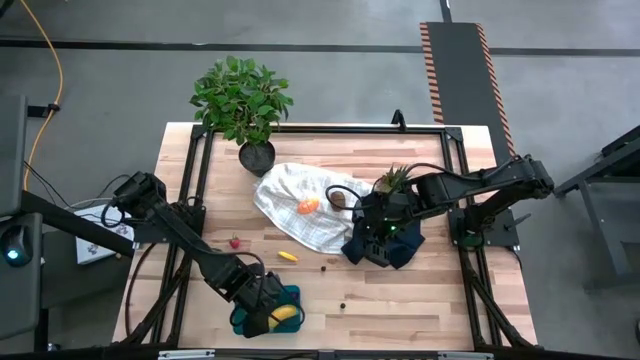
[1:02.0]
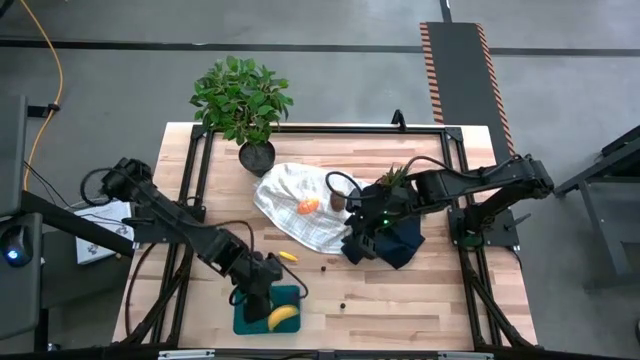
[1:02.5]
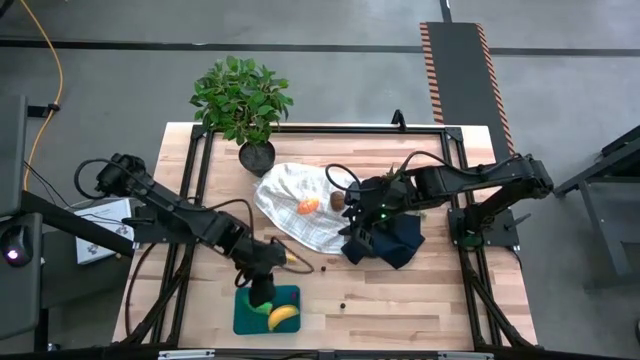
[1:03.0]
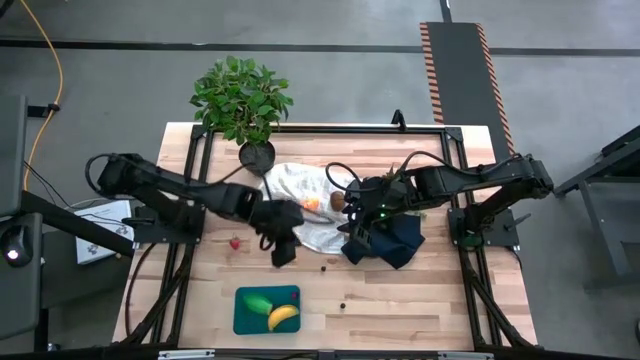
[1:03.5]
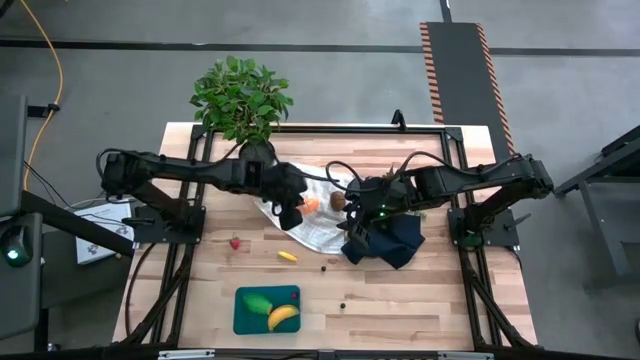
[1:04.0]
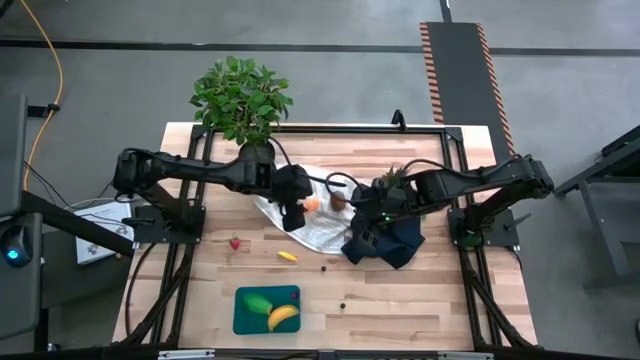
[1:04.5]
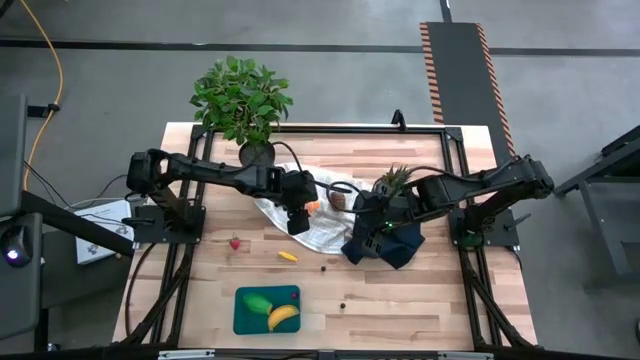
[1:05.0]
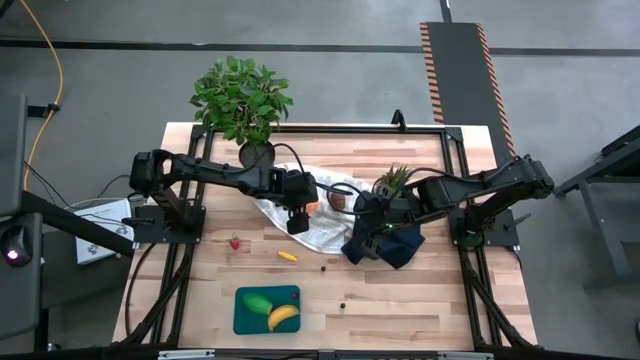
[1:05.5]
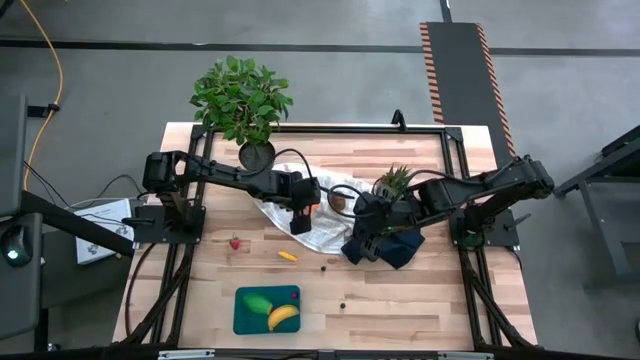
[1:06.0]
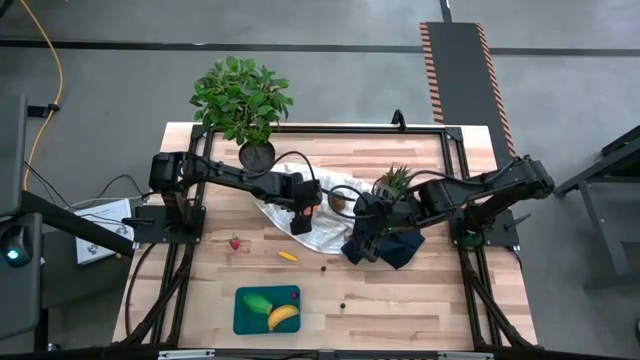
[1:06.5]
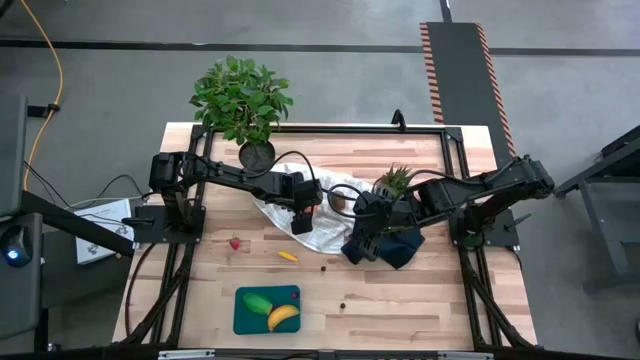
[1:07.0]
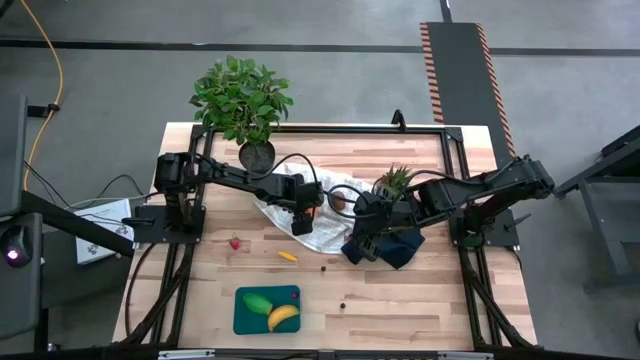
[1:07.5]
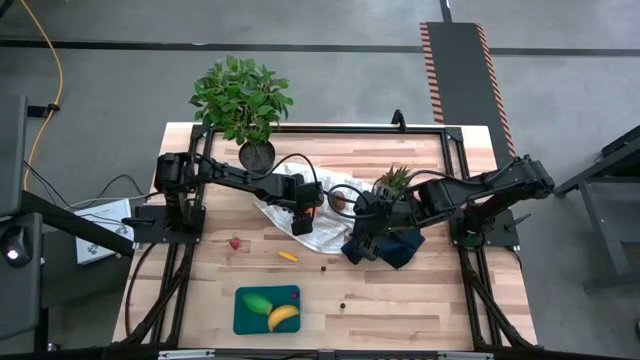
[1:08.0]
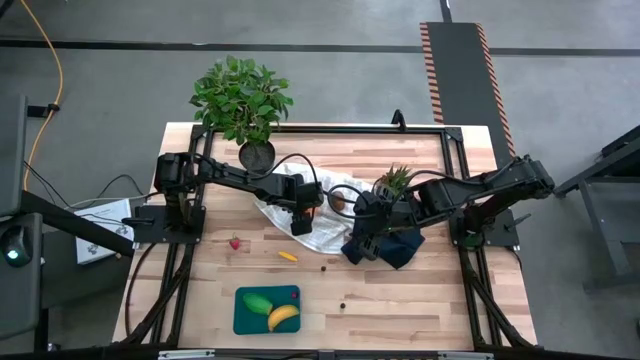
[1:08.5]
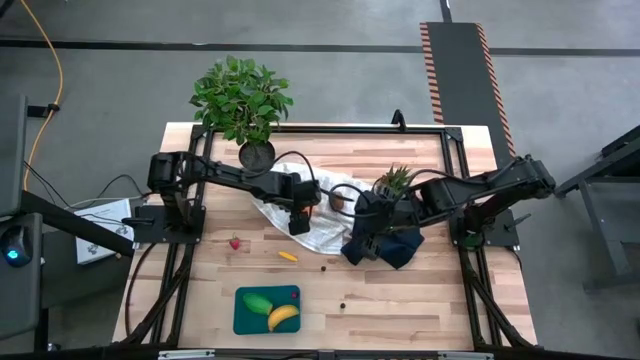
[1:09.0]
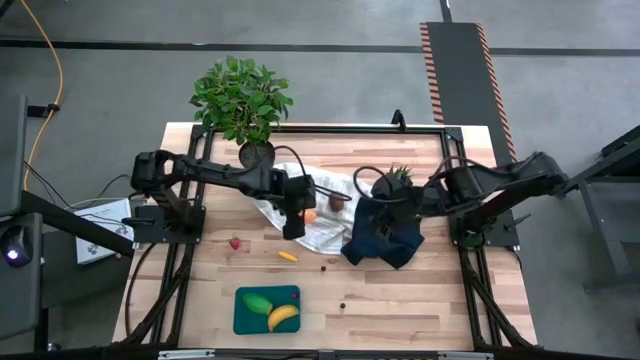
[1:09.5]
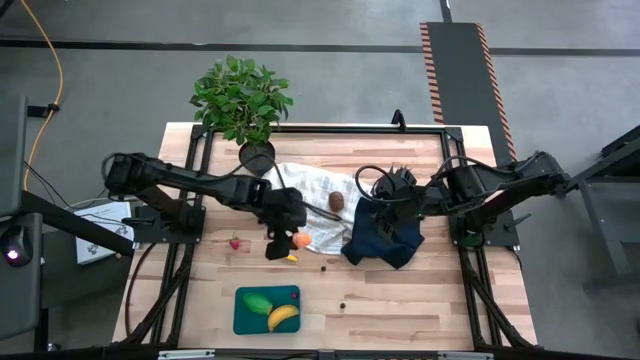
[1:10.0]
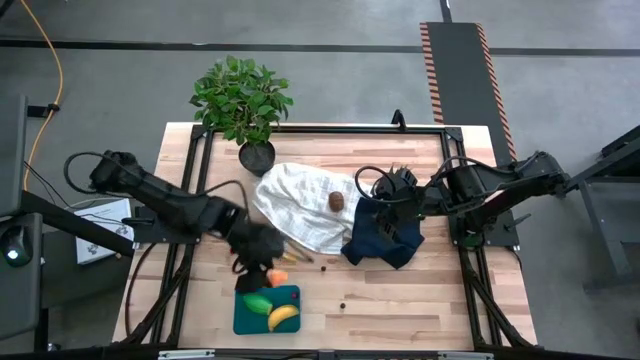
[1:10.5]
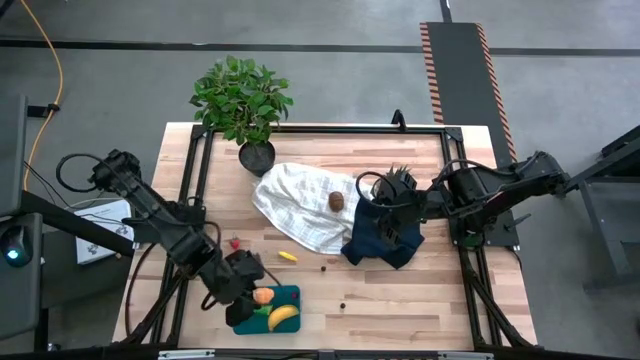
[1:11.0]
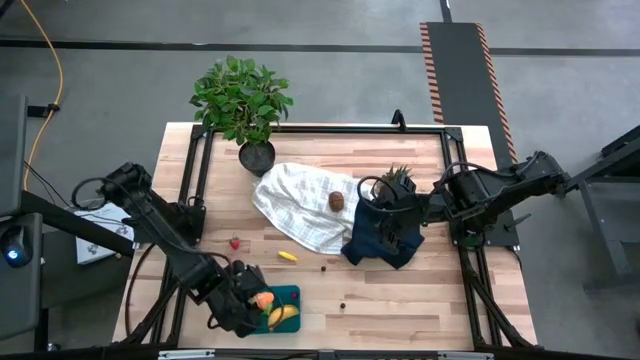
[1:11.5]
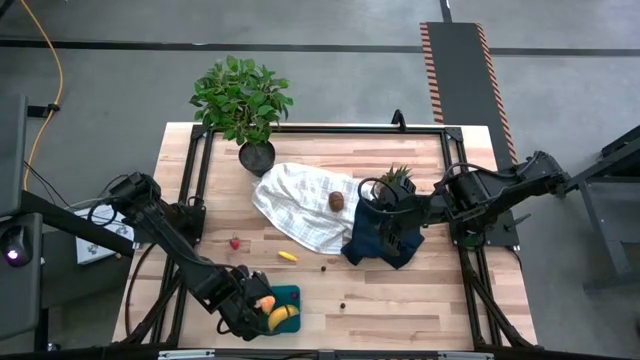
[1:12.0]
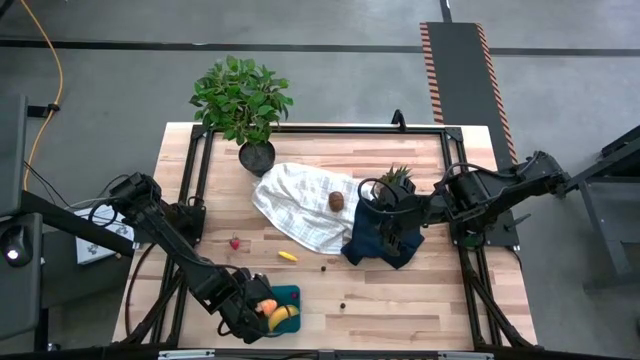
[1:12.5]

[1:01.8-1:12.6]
Task: Pick and placing Produce into tupperware
Put the croissant into the bin

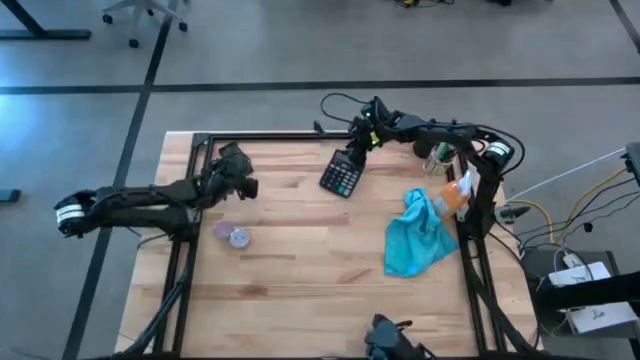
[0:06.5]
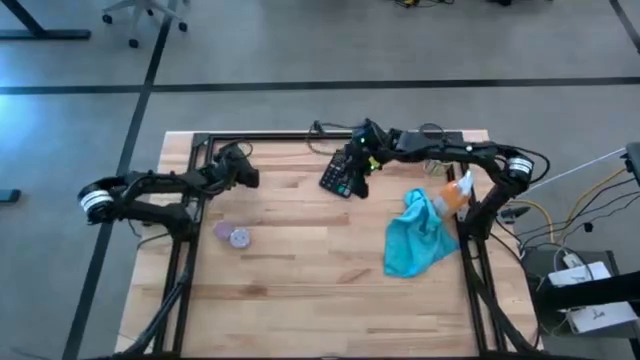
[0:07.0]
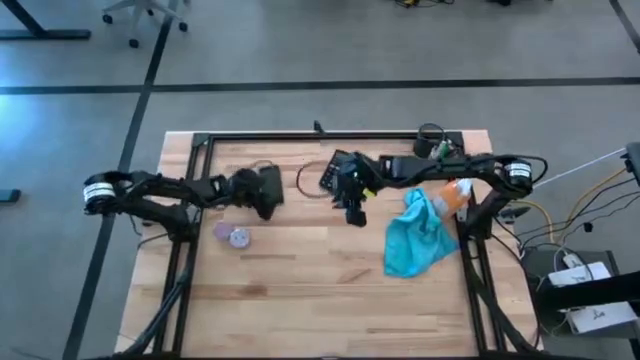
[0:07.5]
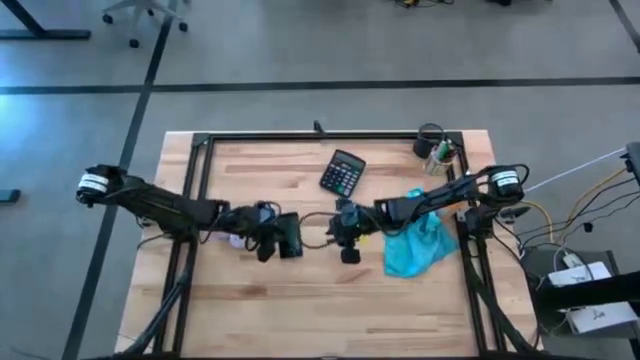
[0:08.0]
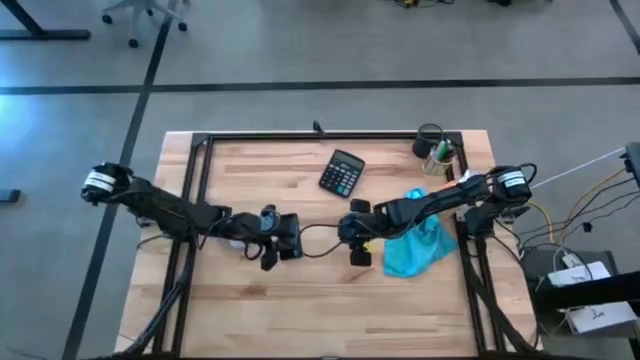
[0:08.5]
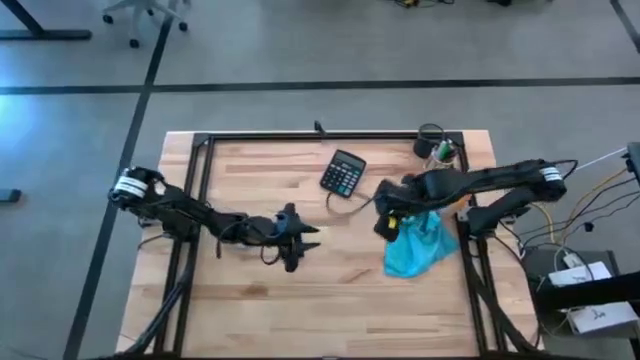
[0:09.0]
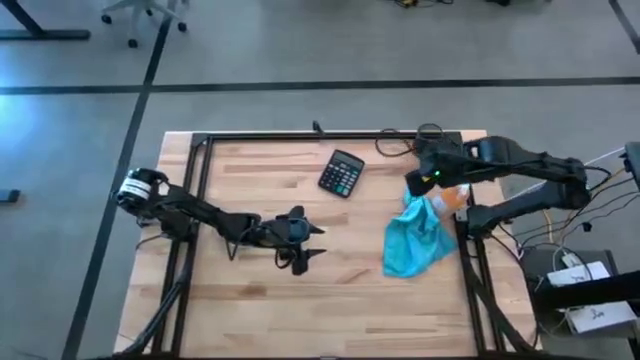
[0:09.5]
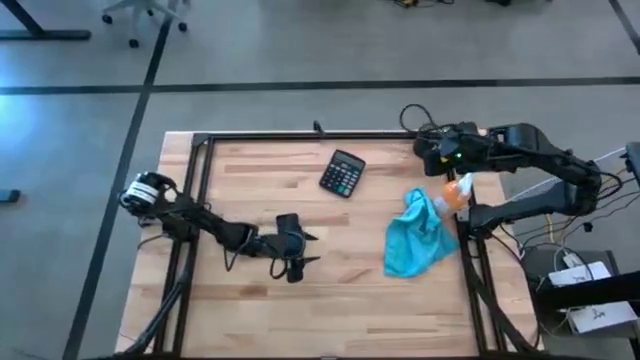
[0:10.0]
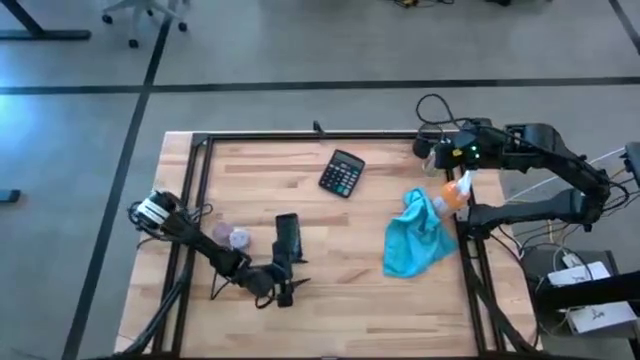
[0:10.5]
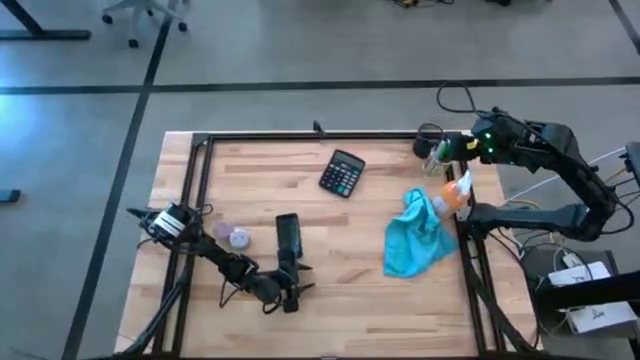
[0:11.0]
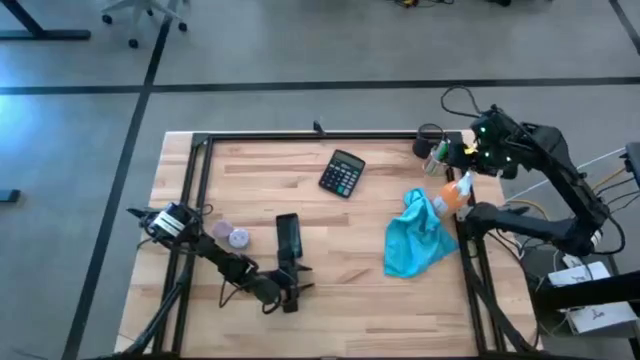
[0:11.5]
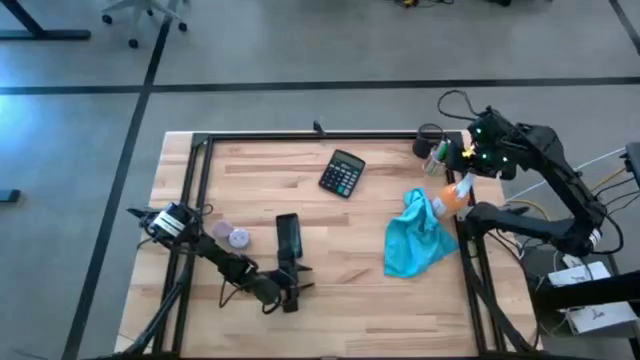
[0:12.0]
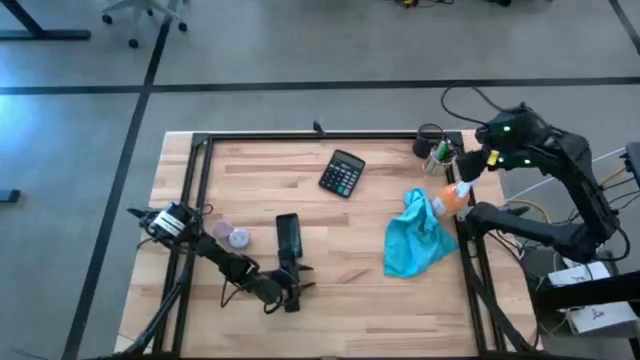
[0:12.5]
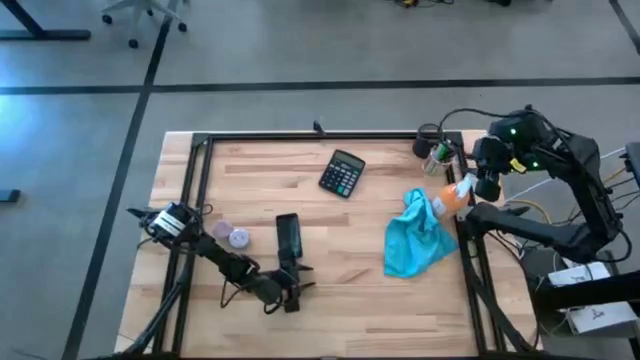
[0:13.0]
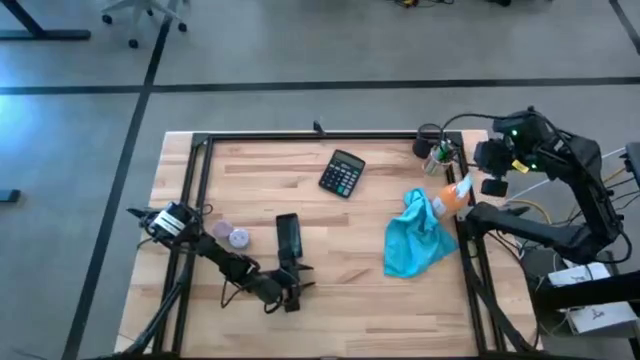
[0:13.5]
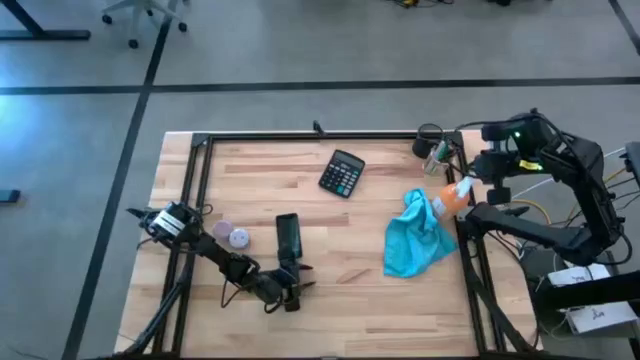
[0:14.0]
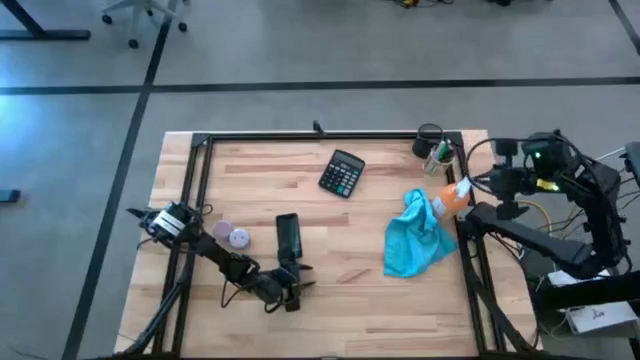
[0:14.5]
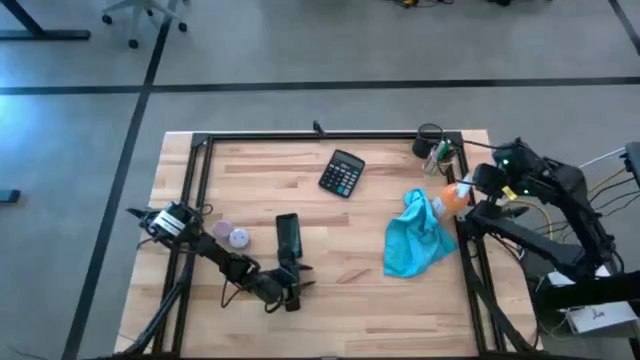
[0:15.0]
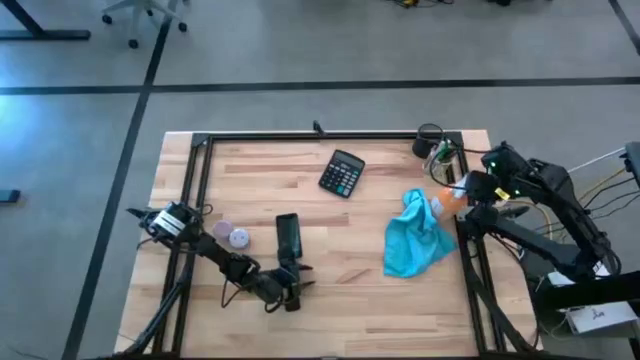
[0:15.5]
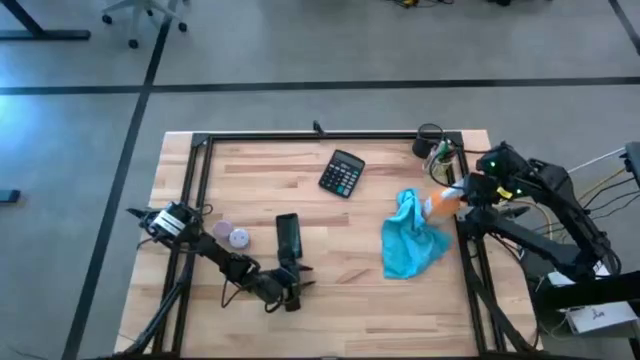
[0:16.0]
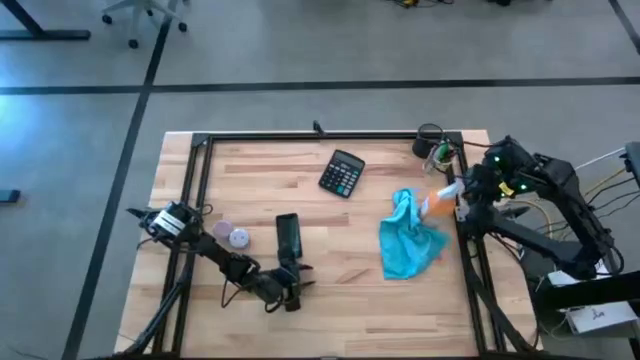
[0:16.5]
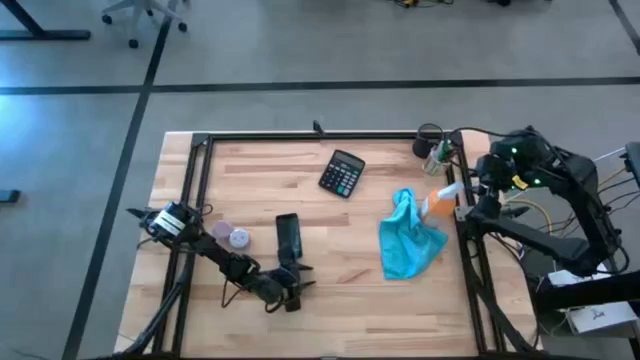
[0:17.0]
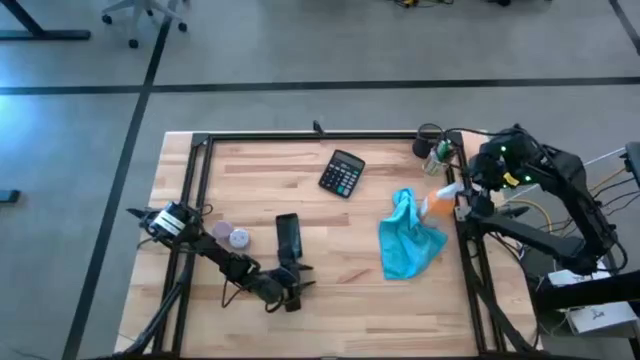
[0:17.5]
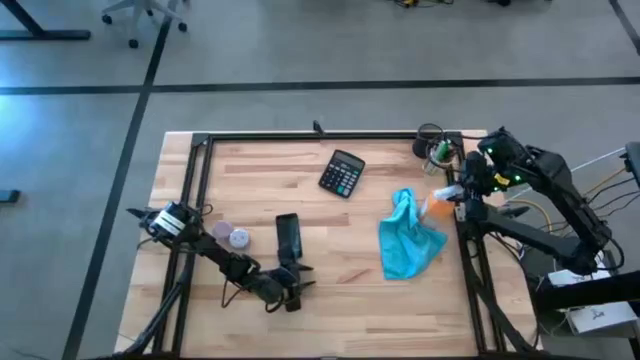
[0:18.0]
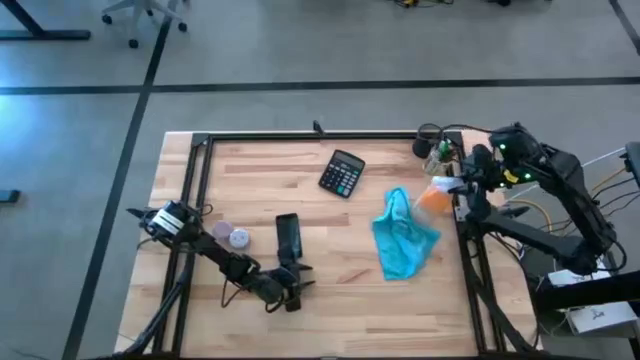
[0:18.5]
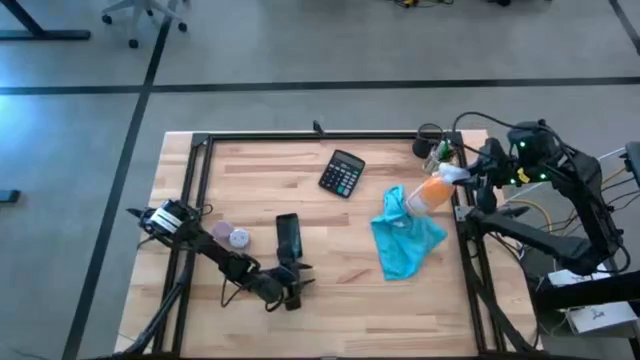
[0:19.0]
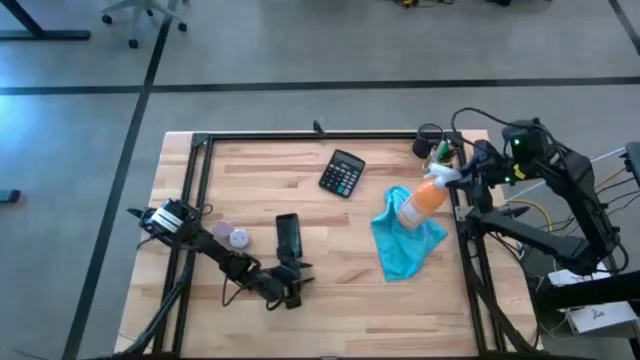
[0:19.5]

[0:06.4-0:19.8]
Task: Apply microfiber cloth
Spray the front and back of the cellphone using the spray bottle
